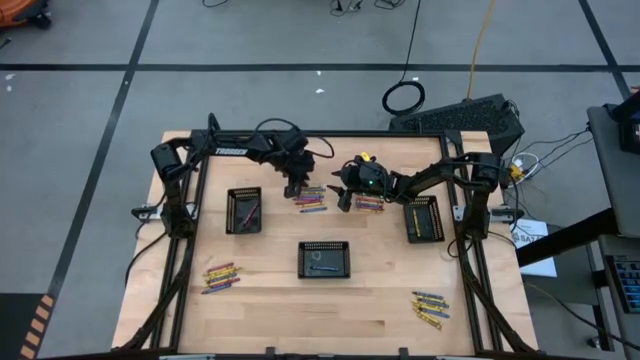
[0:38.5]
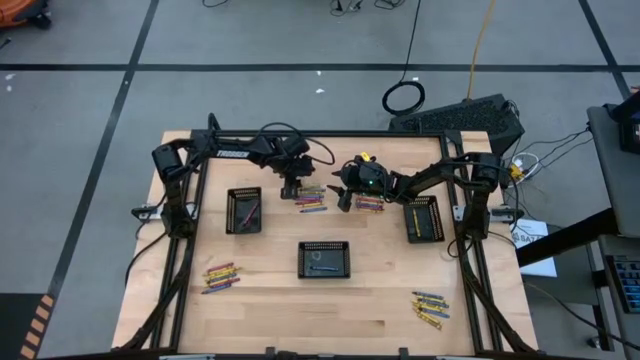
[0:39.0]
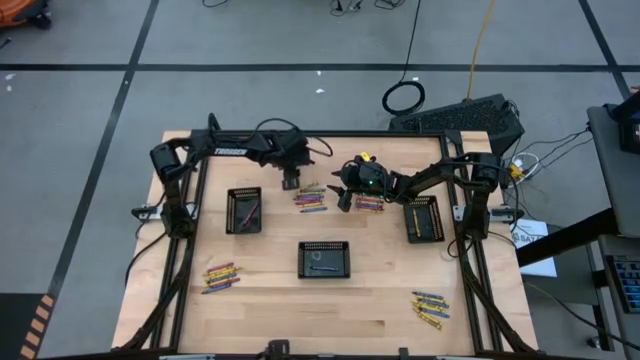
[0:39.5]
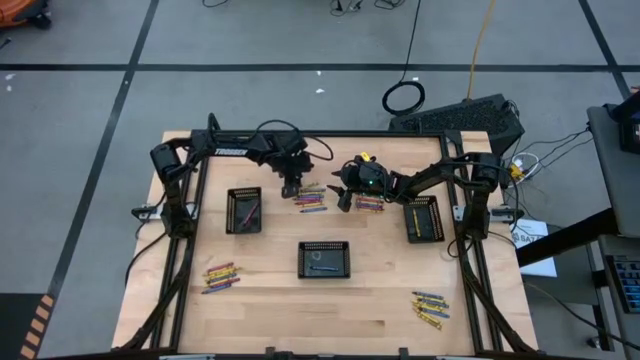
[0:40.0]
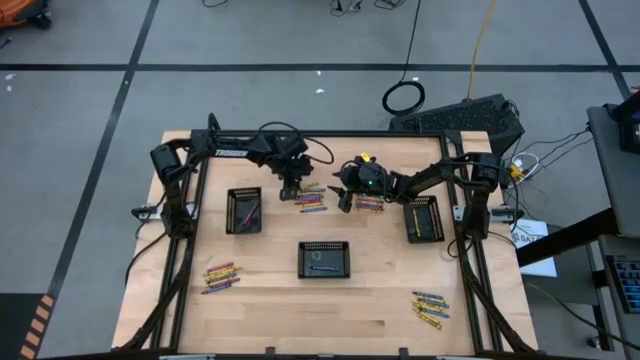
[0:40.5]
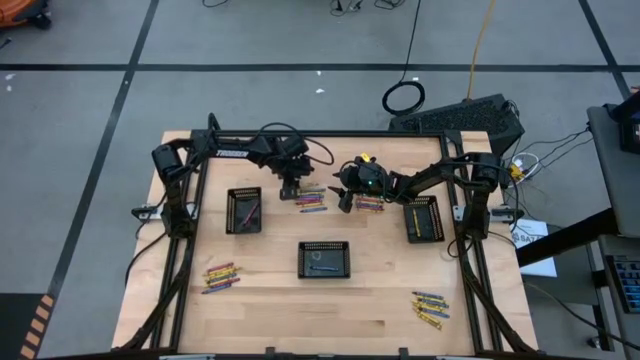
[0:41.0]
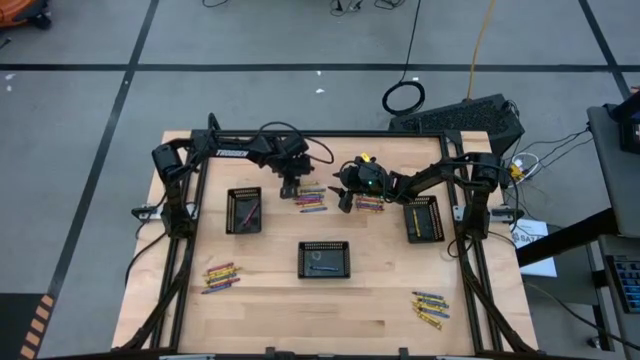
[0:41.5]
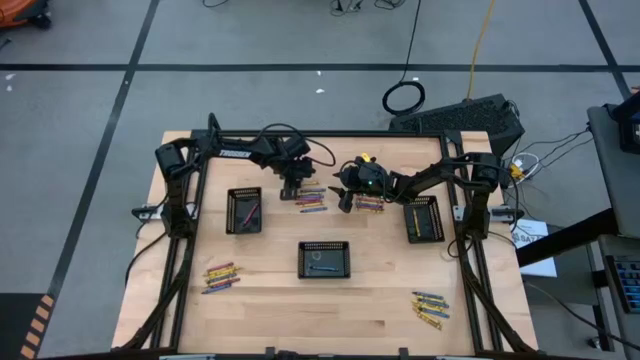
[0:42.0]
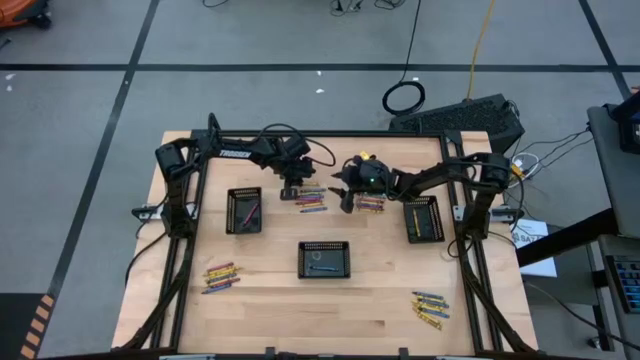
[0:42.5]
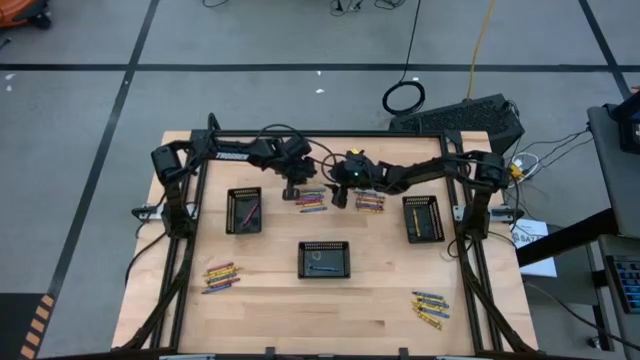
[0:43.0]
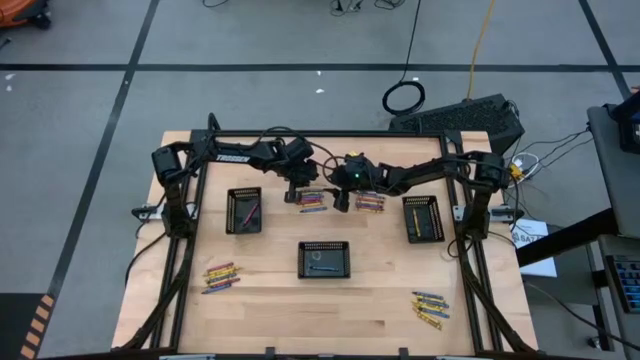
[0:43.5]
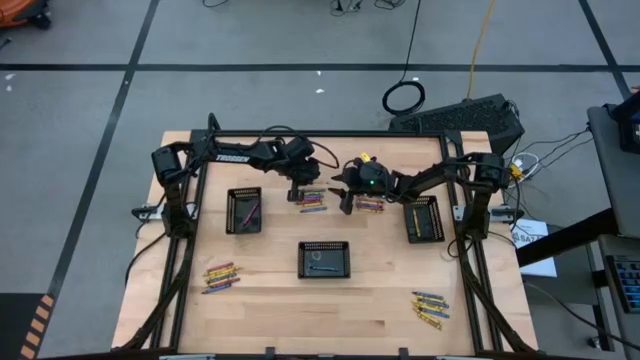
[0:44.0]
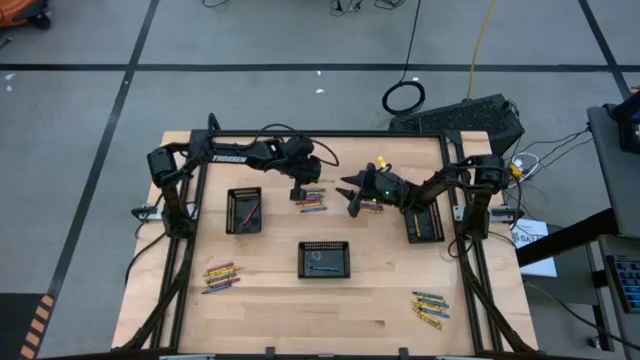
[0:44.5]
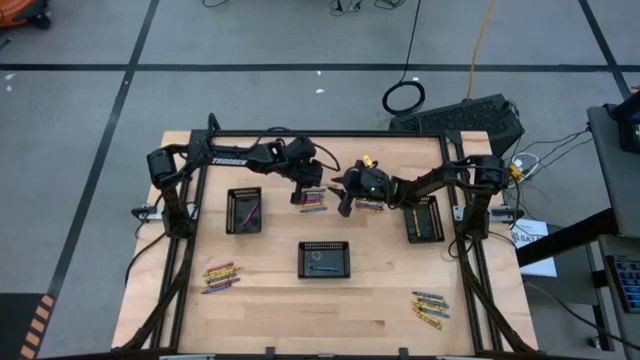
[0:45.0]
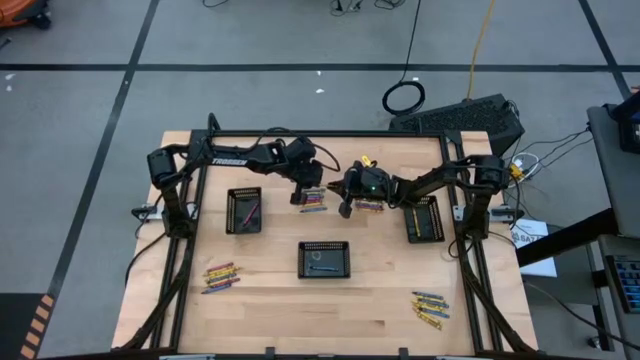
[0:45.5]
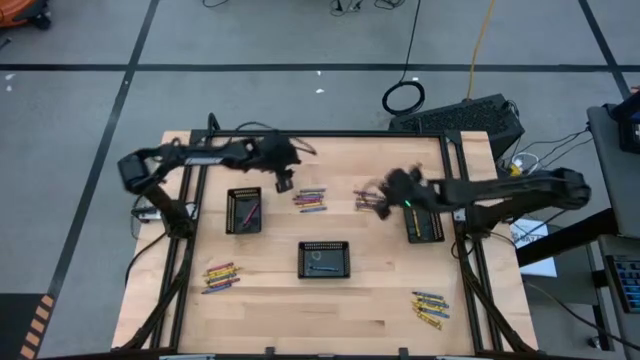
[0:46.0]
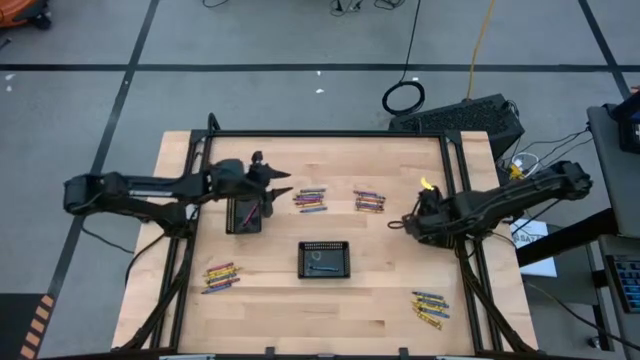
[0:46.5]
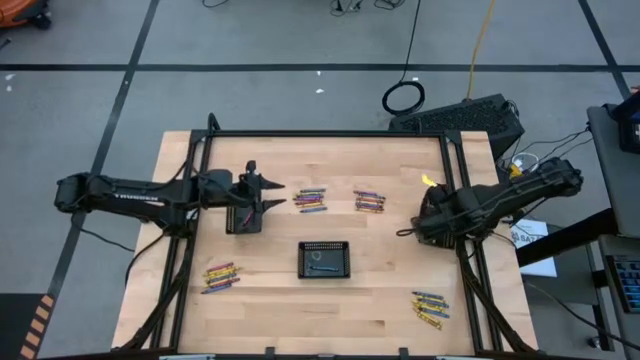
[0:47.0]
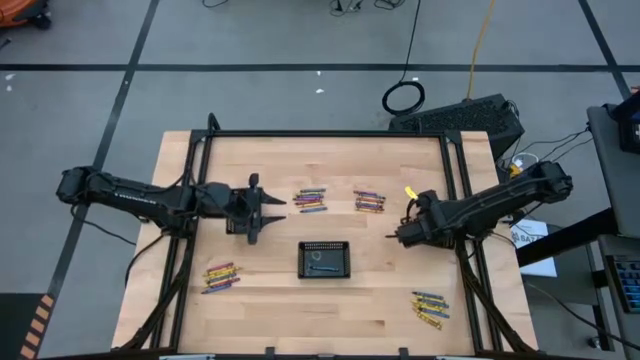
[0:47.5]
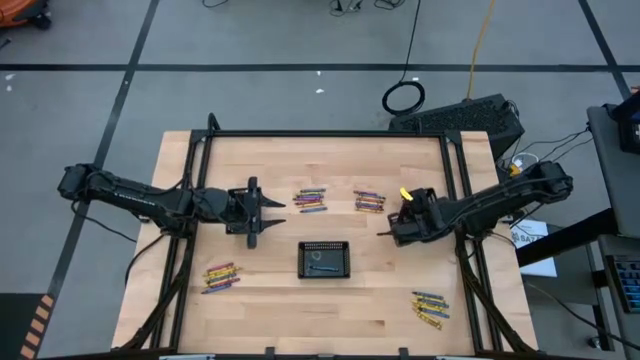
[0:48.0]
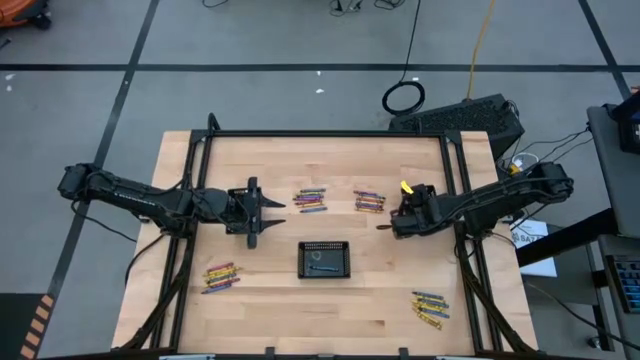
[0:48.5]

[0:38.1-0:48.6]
Task: Sort crayons
Put the yellow crayon into the right black basket

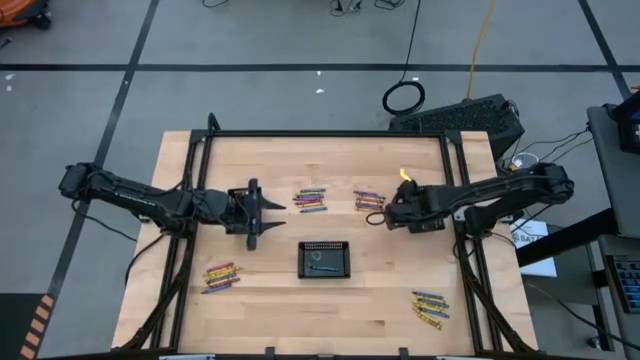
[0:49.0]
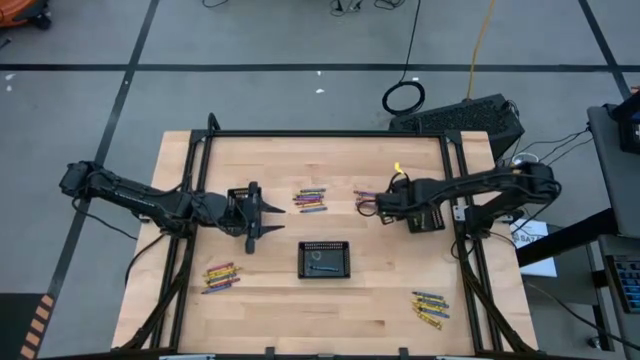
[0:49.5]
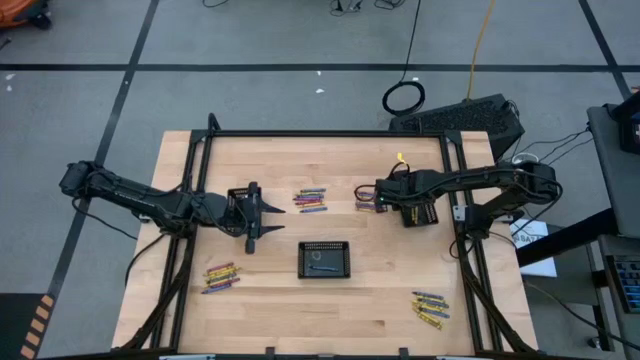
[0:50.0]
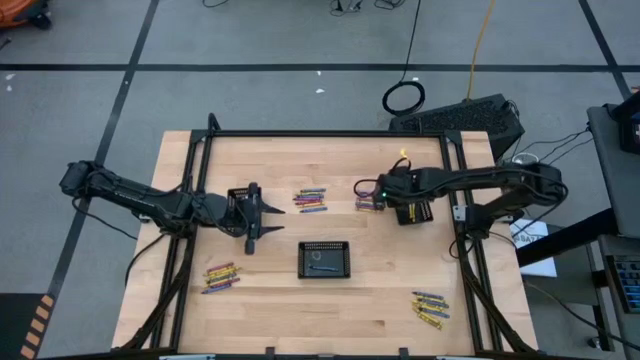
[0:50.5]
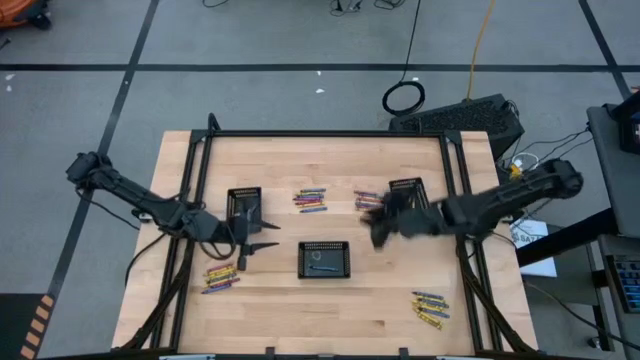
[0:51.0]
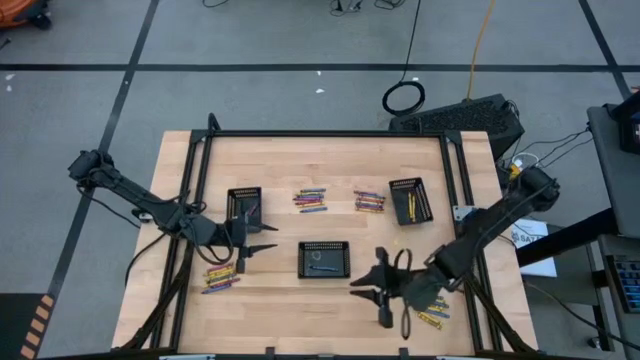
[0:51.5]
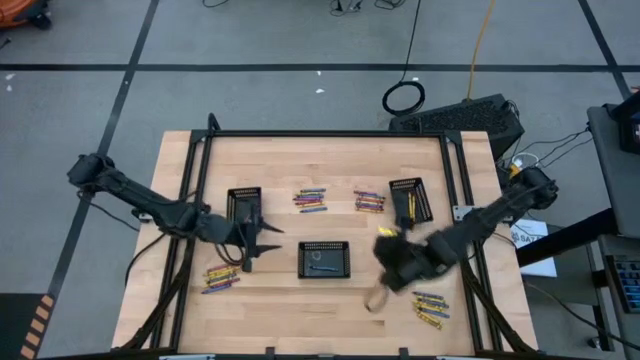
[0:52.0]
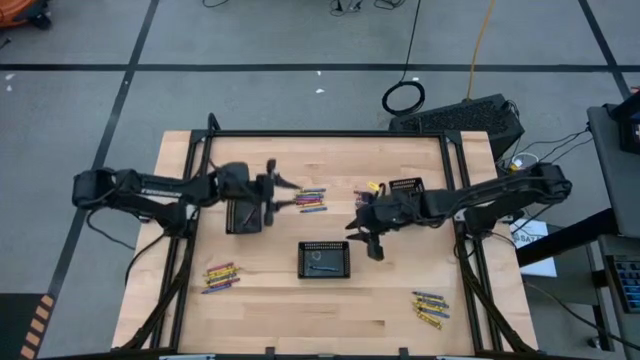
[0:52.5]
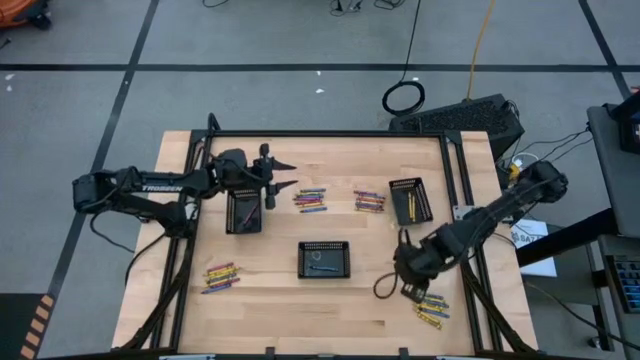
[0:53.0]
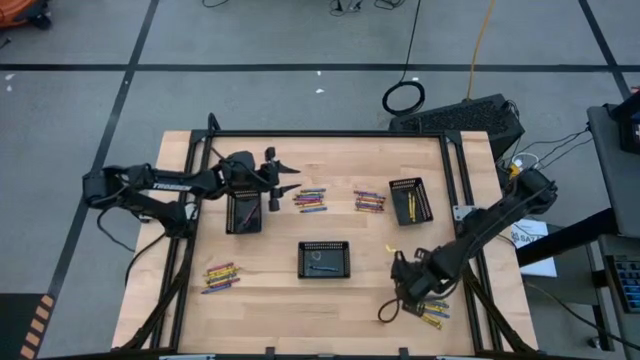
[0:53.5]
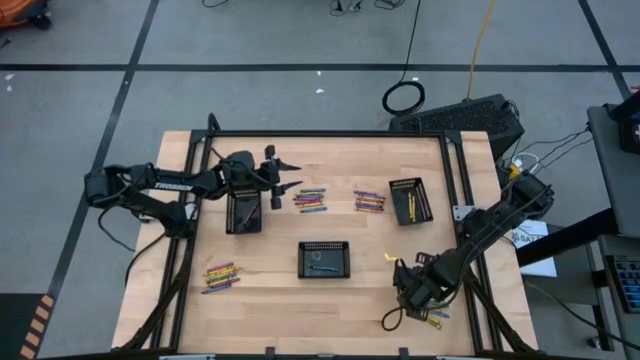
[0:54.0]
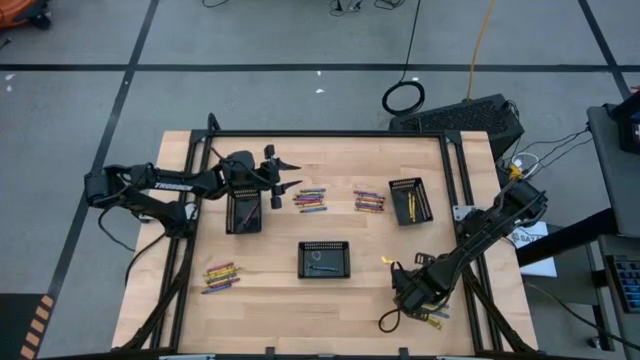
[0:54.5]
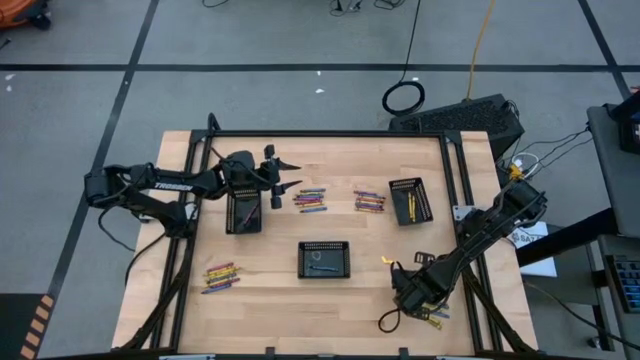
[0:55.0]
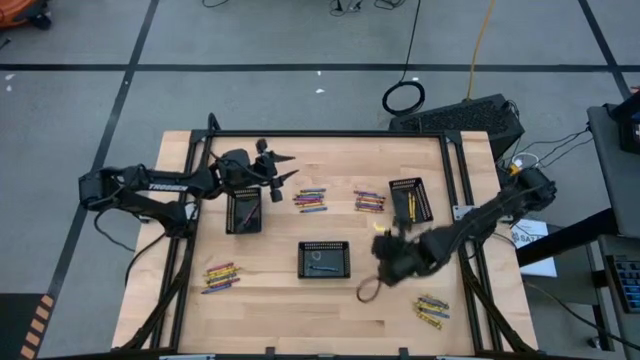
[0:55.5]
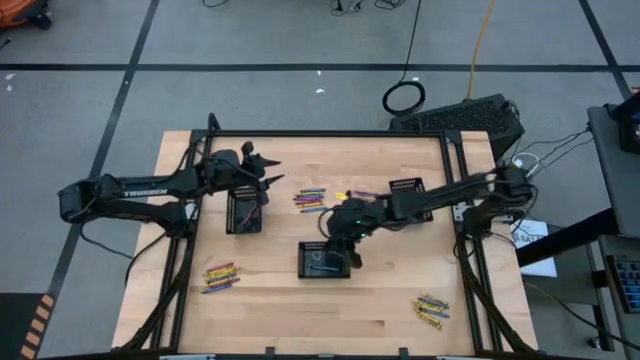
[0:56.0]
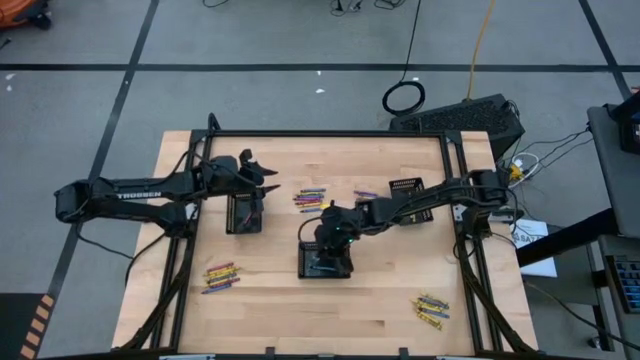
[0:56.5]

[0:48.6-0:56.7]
Put the blue crayon into the center black basket

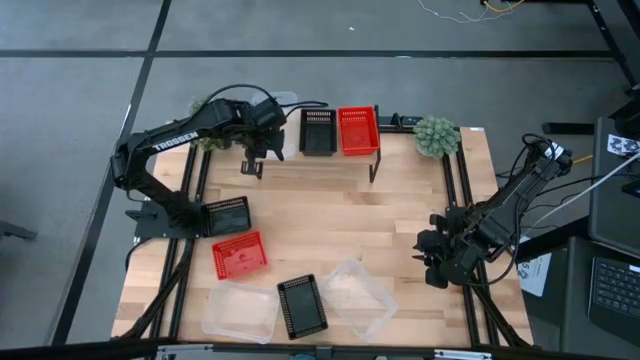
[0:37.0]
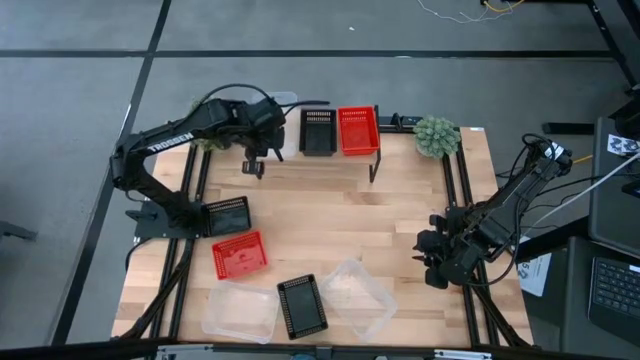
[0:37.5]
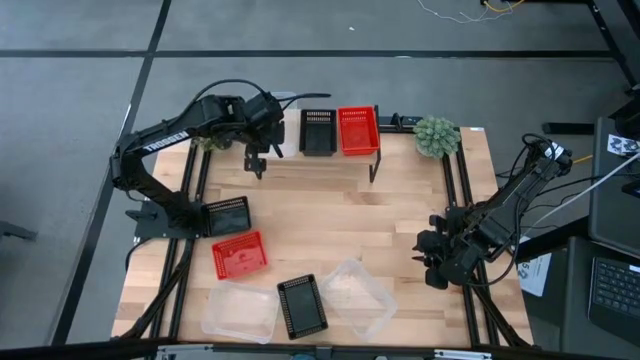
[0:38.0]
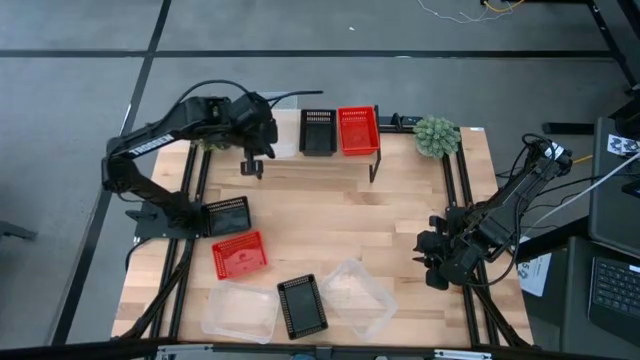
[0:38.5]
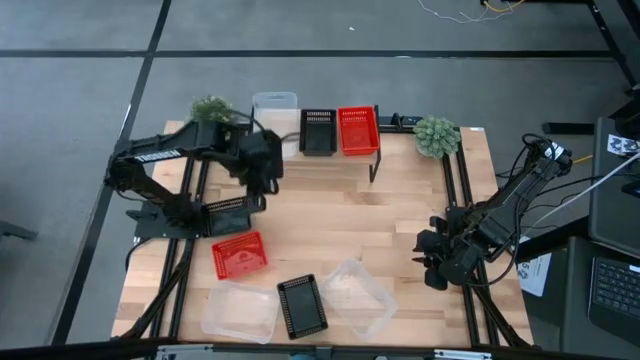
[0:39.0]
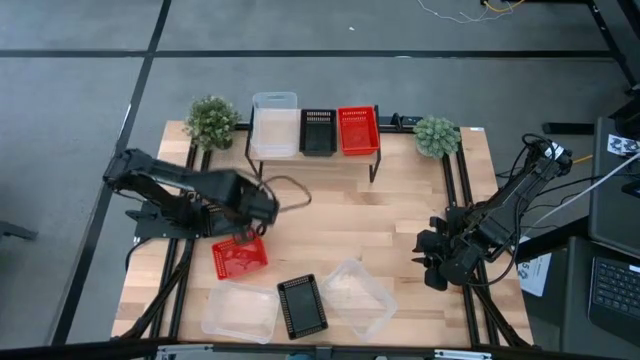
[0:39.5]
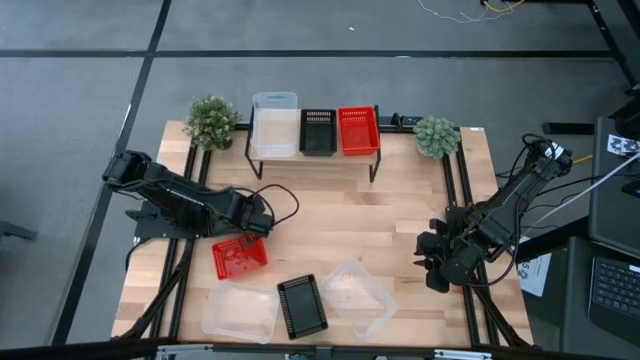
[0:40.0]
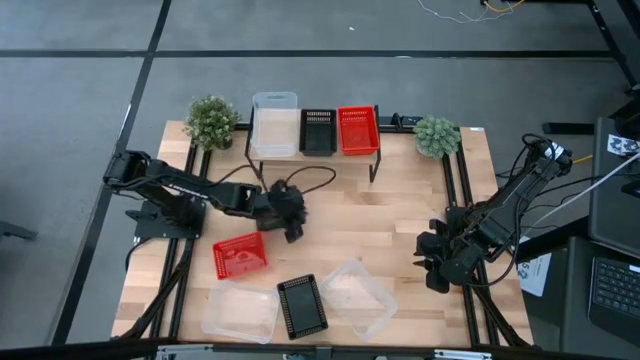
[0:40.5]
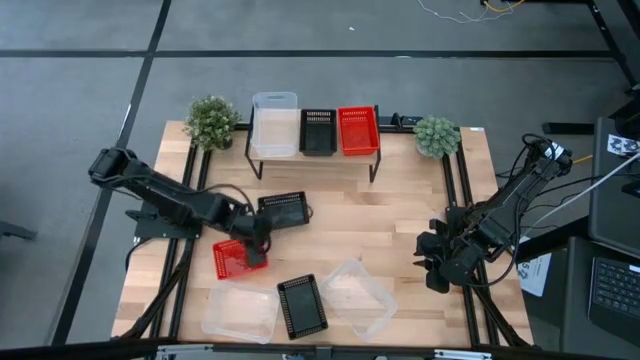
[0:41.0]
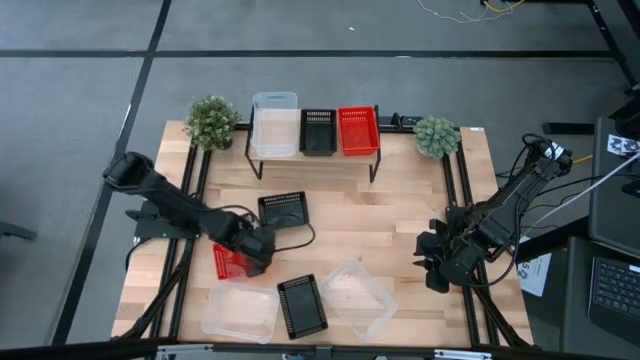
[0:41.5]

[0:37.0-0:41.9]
Task: Stack baskets on shelf by color
Move the bins to the center
